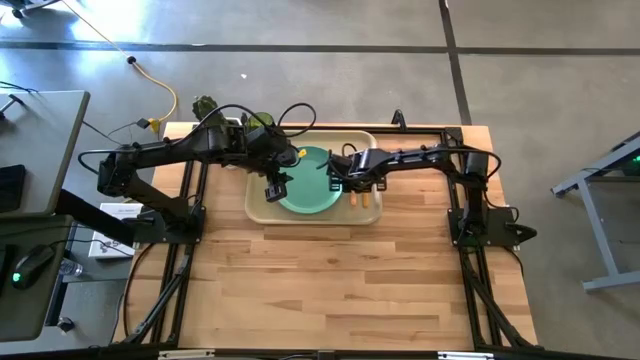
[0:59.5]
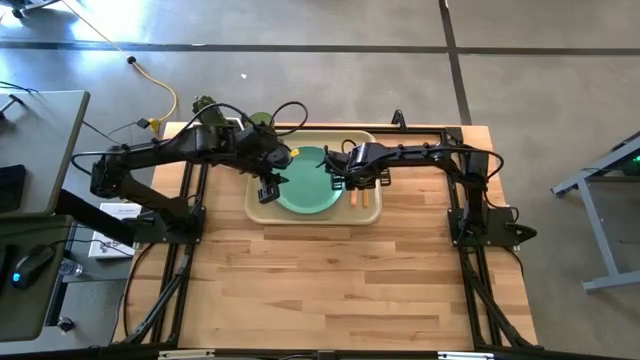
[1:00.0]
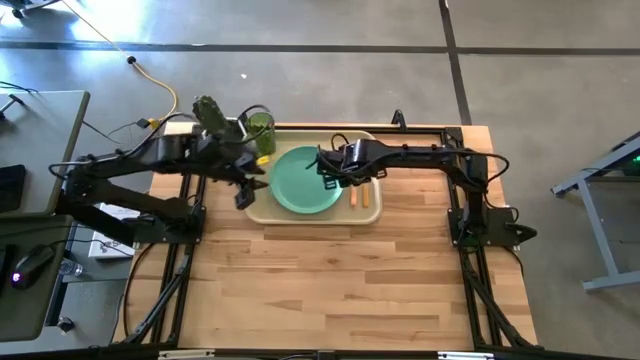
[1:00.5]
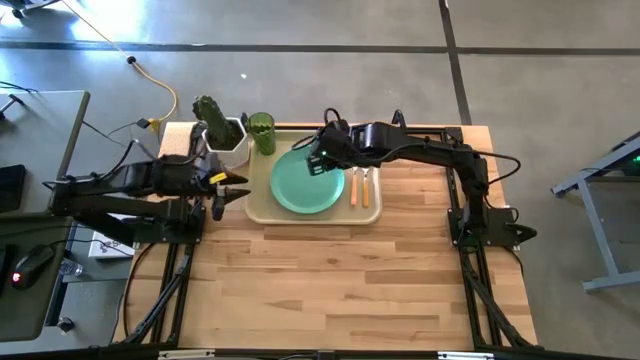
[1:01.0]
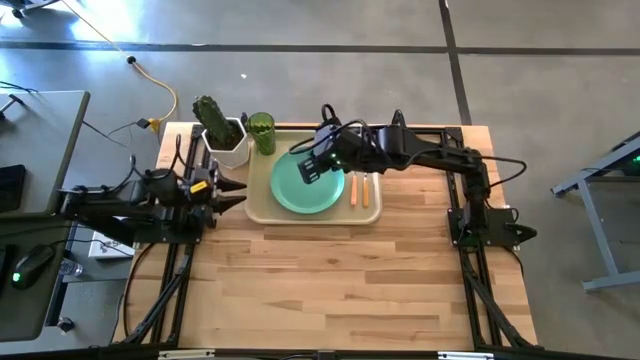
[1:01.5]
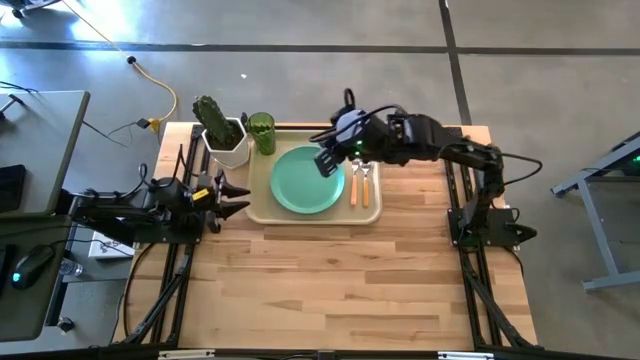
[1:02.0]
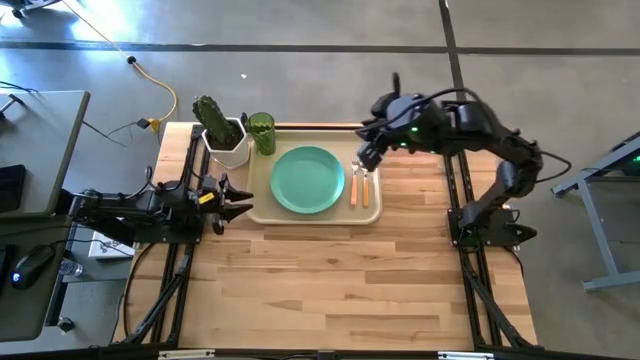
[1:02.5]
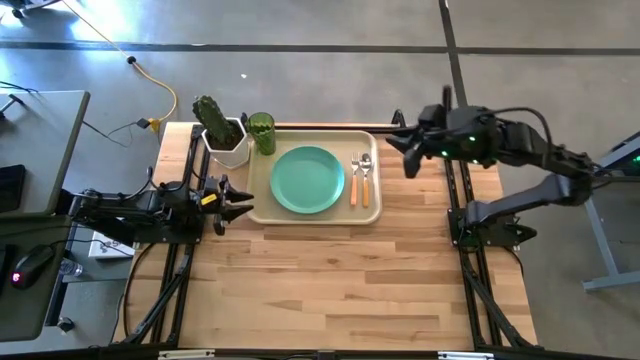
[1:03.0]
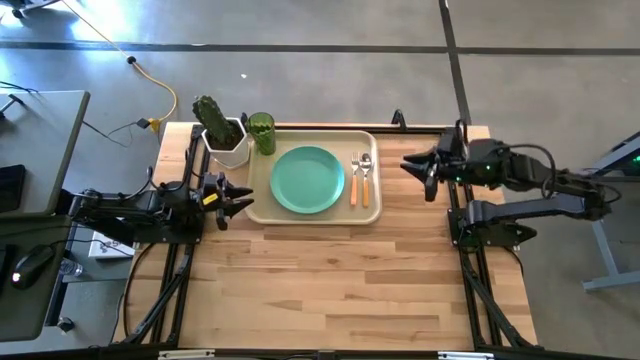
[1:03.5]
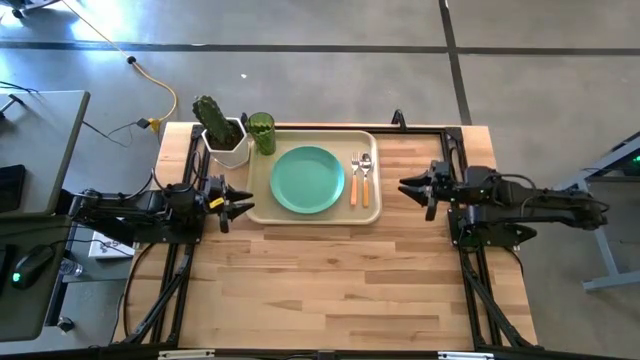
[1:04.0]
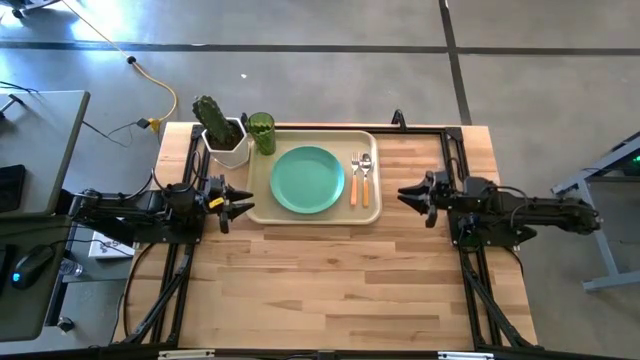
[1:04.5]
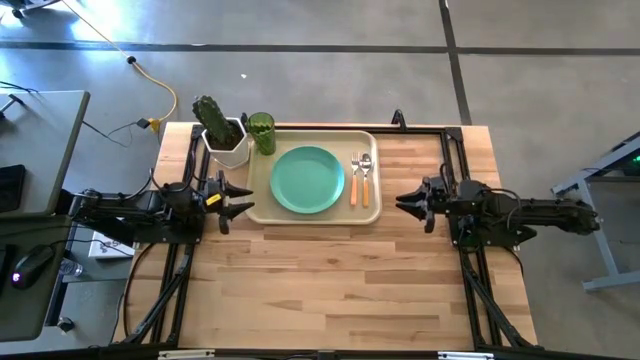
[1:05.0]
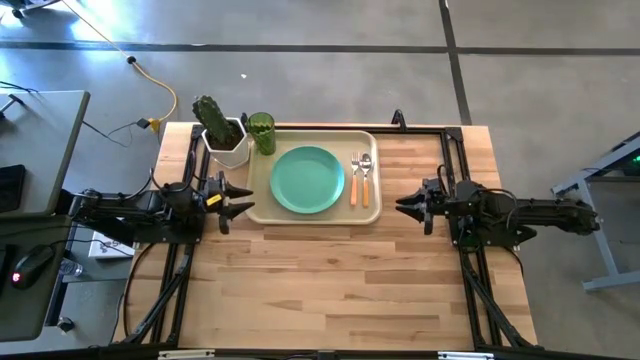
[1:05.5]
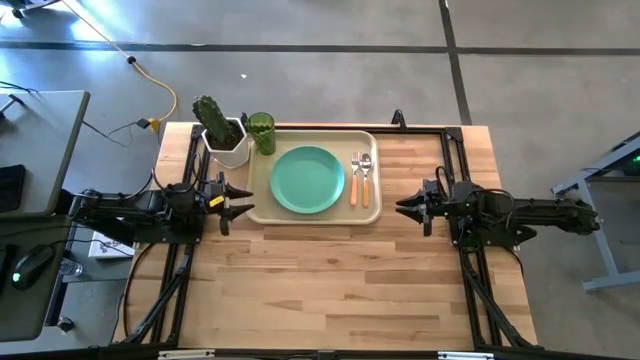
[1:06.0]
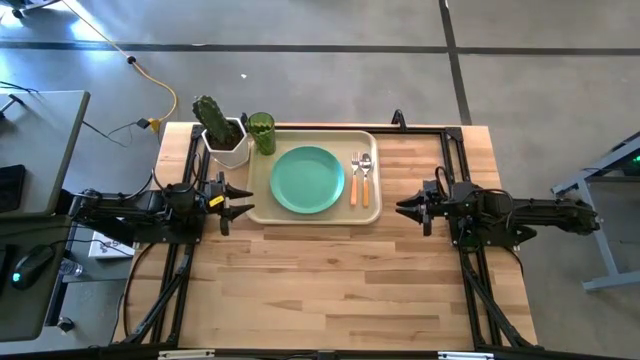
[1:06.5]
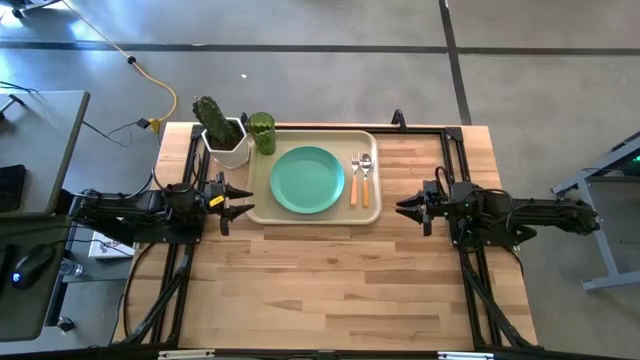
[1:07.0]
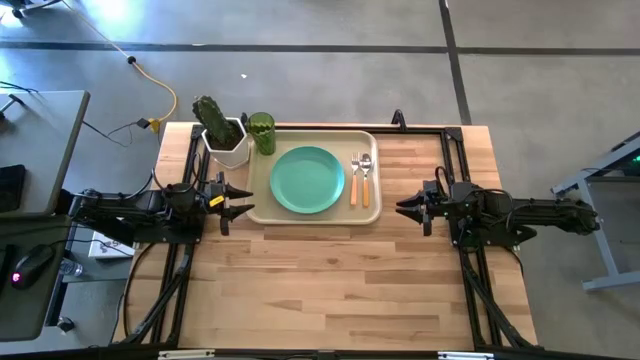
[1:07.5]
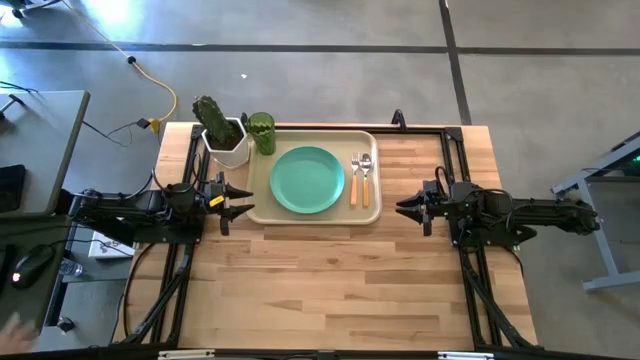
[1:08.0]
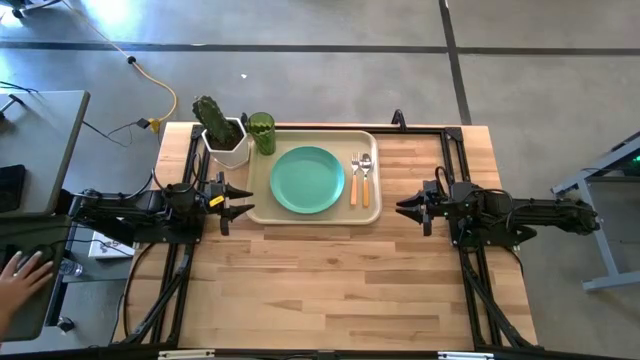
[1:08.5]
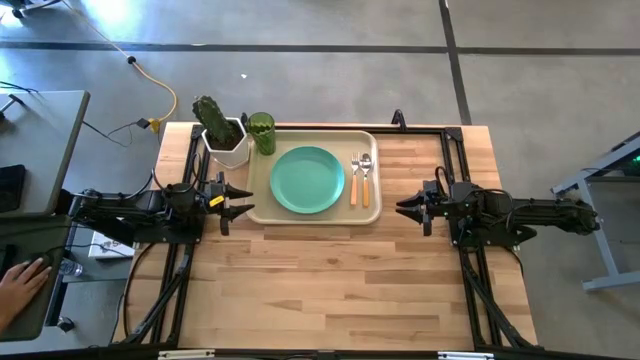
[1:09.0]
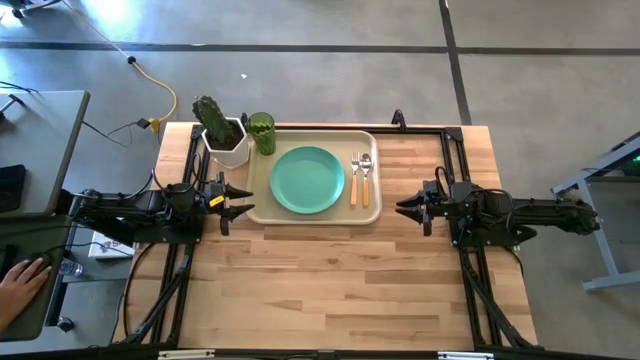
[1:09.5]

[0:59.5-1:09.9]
Task: Pick and place plate/cup/fork/spoon on tray
Return to Home Position

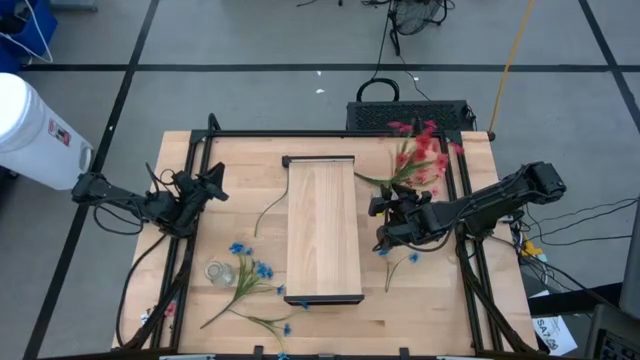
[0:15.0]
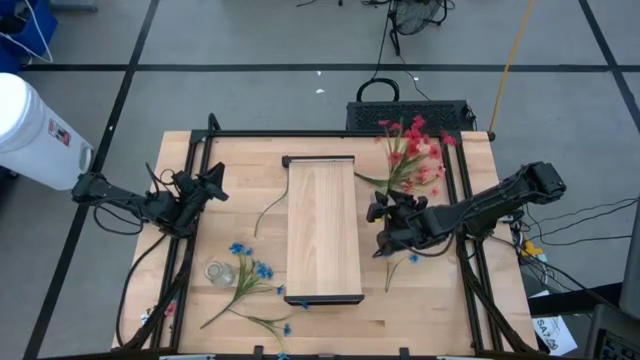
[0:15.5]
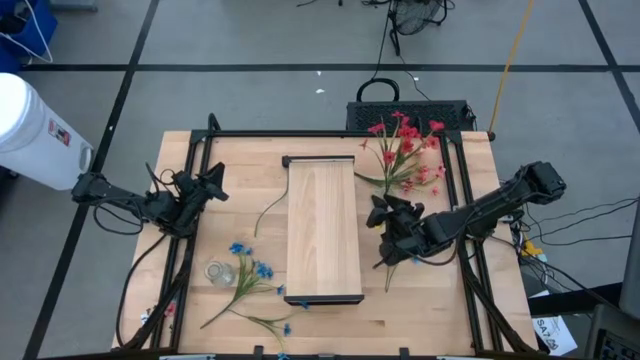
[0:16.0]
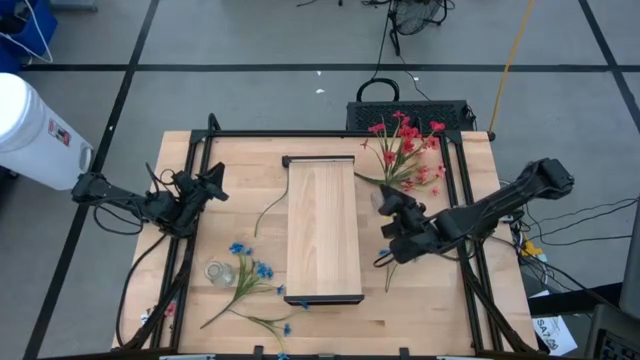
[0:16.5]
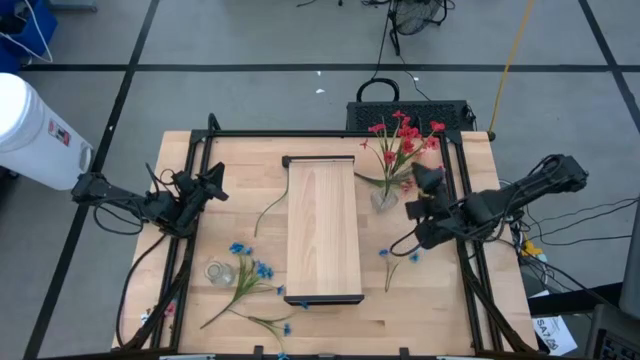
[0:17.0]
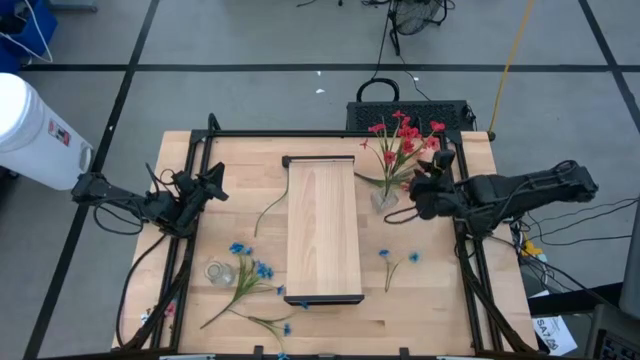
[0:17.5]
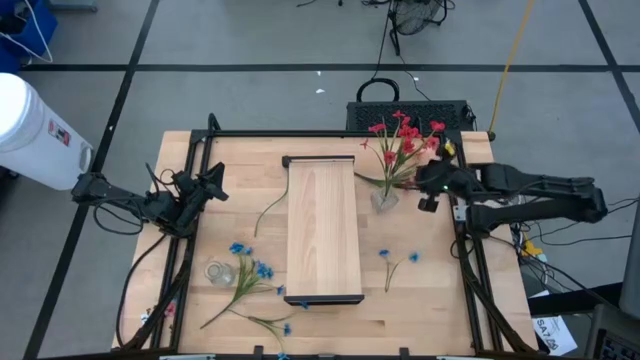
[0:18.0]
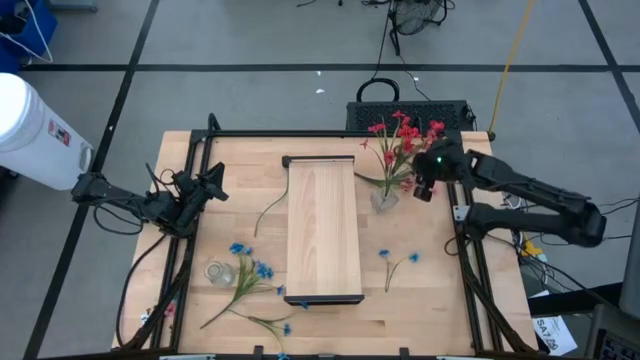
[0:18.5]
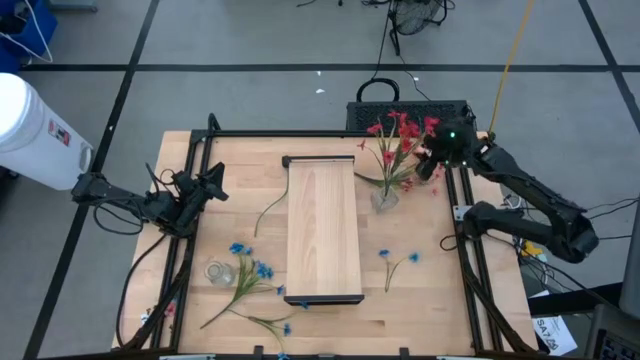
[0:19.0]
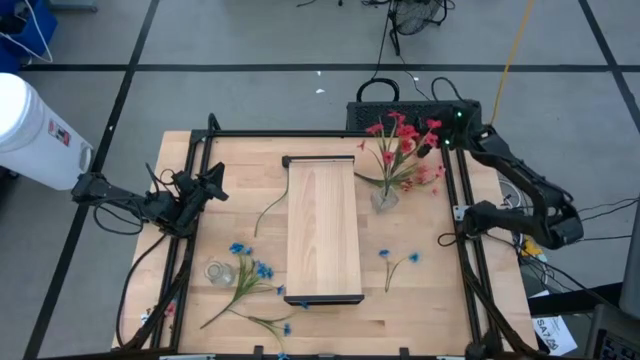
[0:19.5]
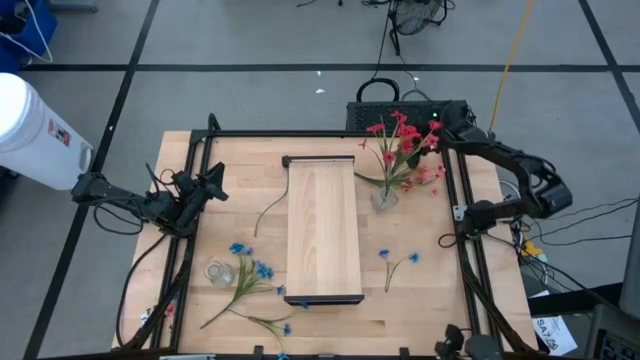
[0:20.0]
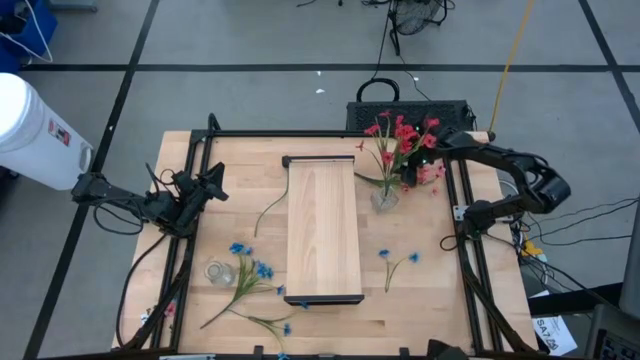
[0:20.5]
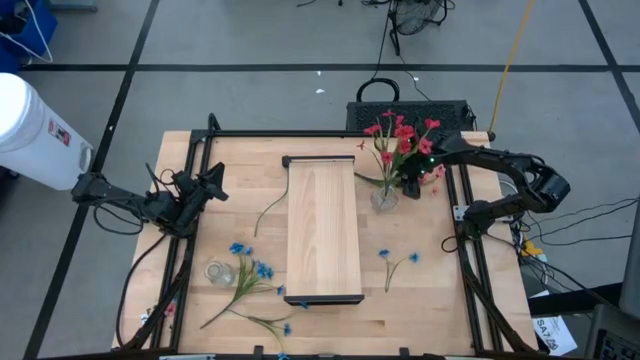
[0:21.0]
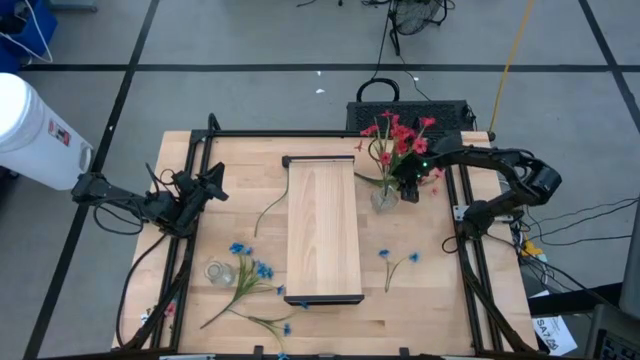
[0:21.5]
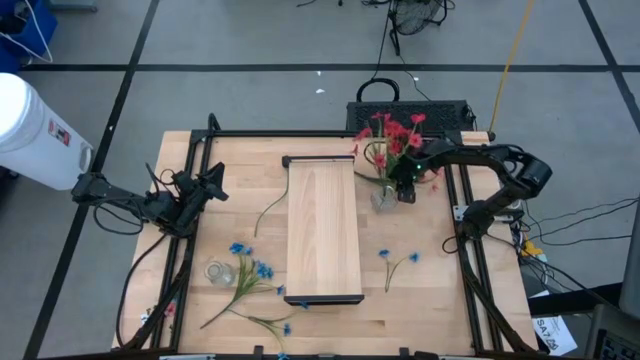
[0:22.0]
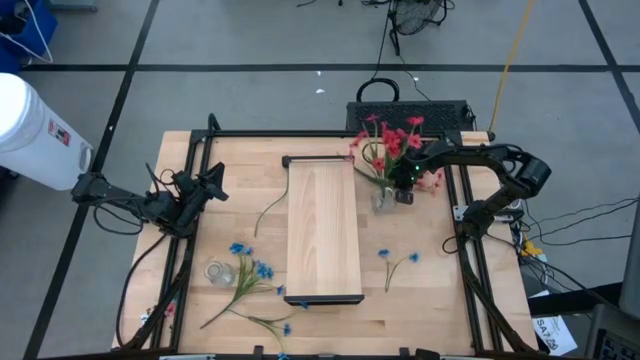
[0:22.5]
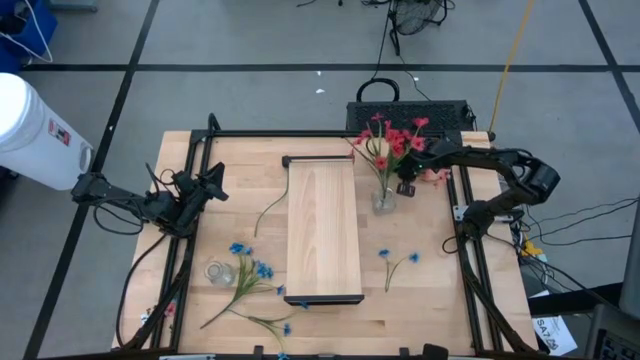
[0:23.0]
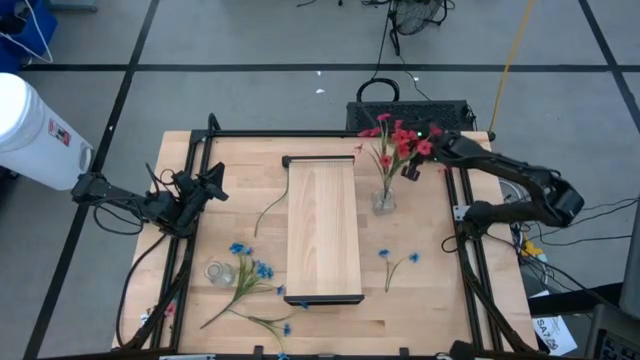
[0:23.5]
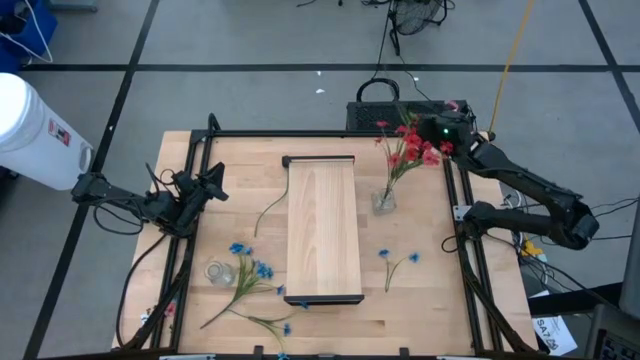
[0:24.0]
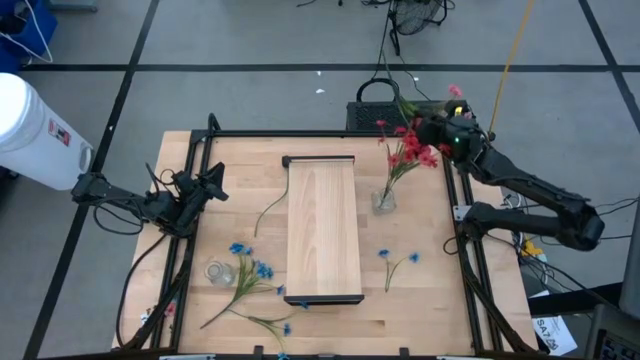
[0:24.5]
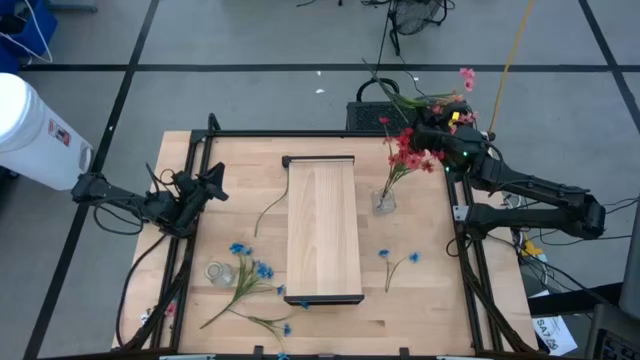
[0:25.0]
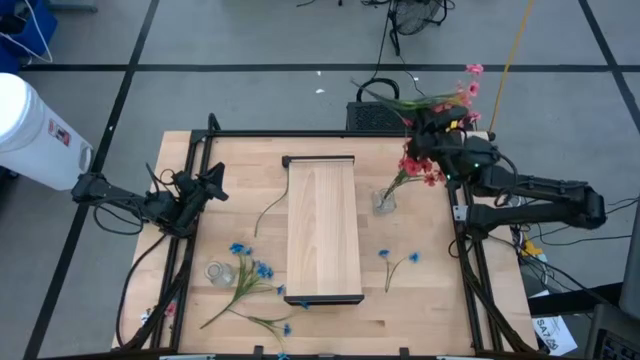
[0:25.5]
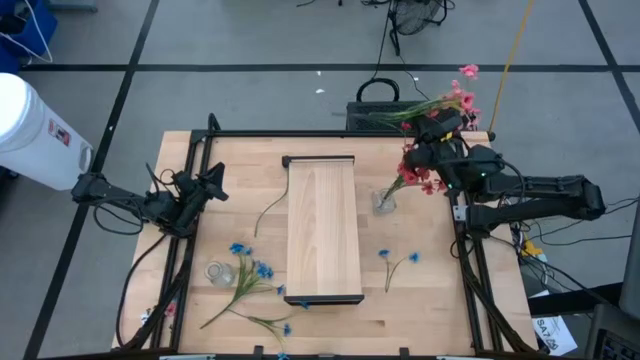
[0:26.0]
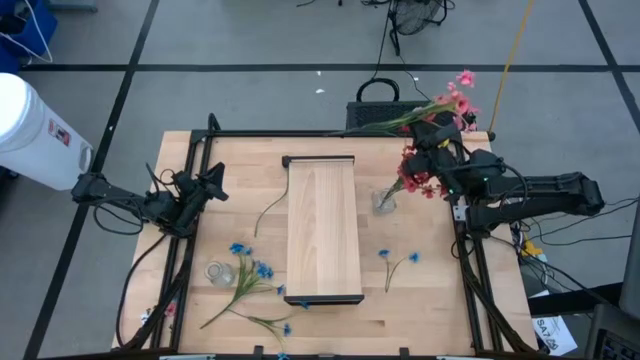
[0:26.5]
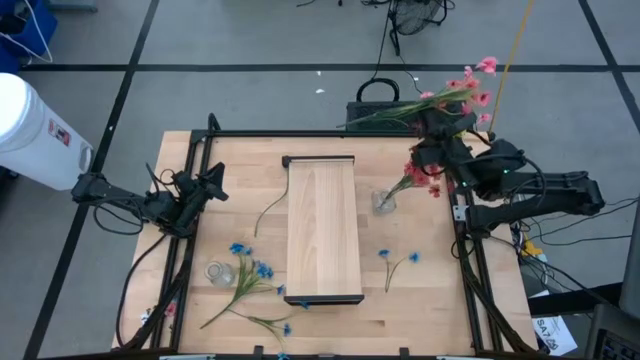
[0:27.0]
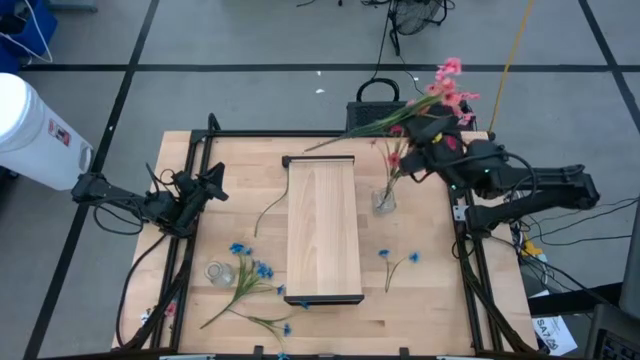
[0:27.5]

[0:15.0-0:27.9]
Task: Pick and place flowers into a vace then onto a shelf
Put the pink flowers into the right transparent vase
